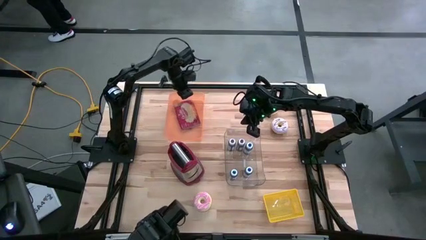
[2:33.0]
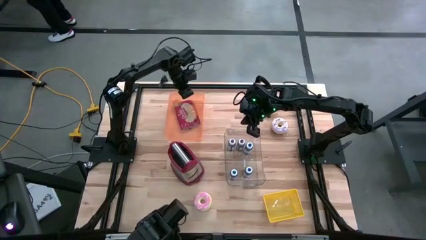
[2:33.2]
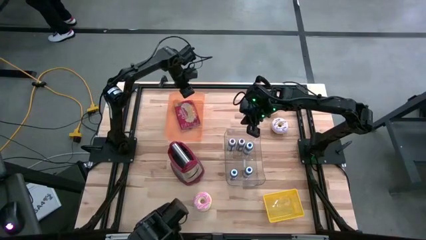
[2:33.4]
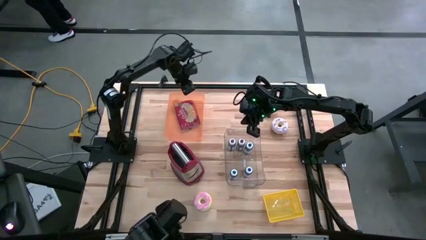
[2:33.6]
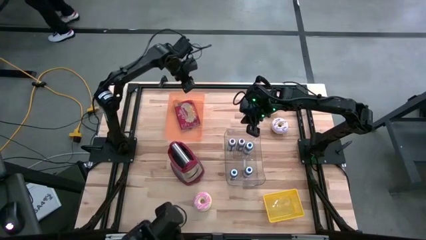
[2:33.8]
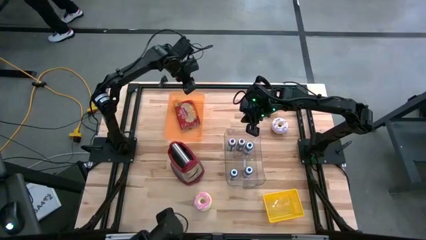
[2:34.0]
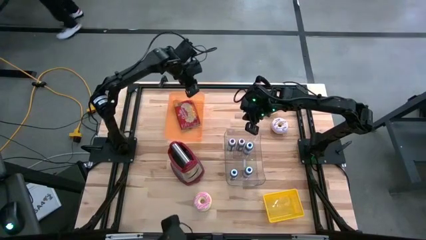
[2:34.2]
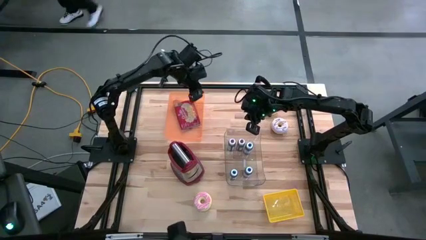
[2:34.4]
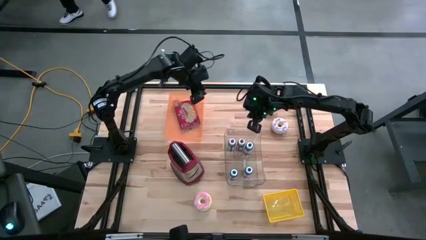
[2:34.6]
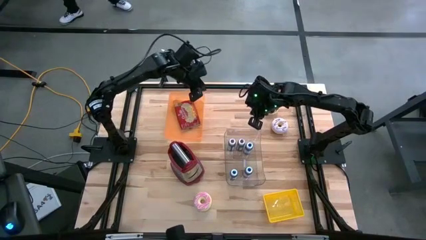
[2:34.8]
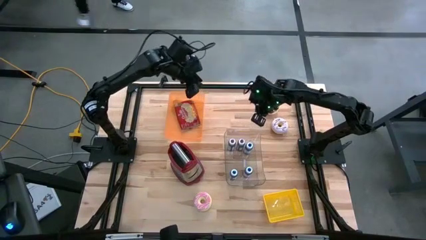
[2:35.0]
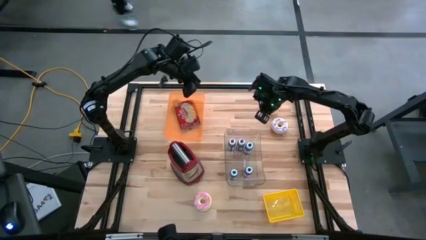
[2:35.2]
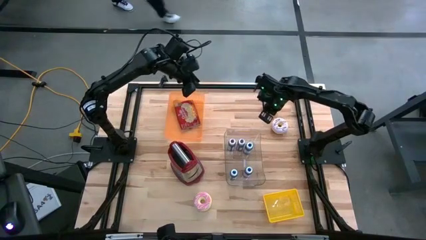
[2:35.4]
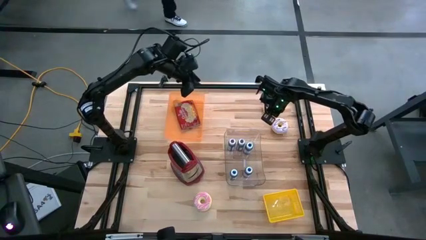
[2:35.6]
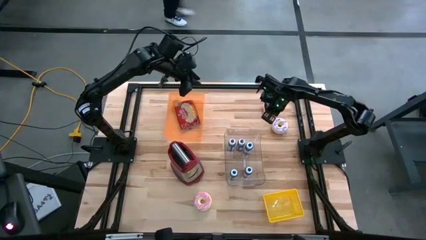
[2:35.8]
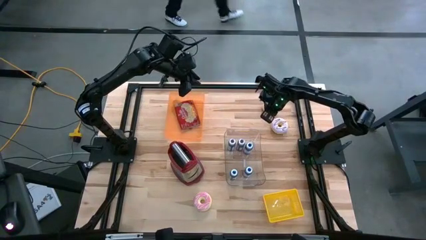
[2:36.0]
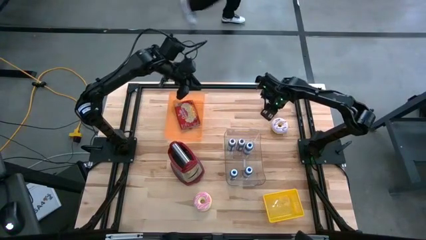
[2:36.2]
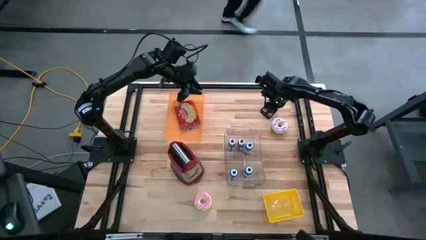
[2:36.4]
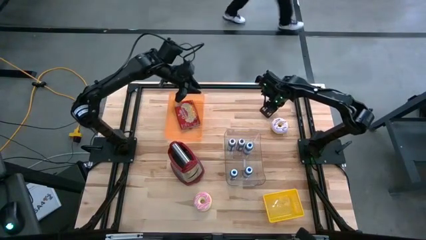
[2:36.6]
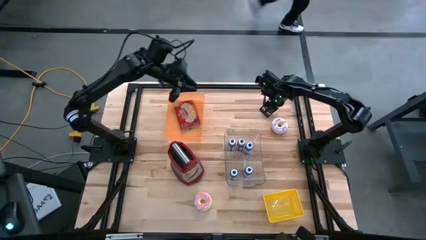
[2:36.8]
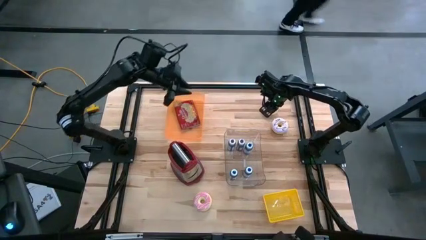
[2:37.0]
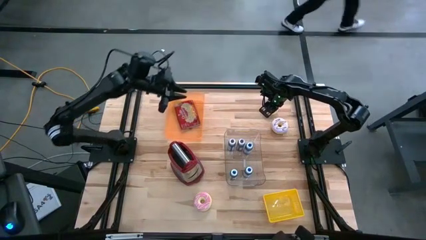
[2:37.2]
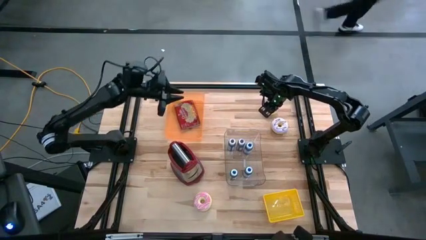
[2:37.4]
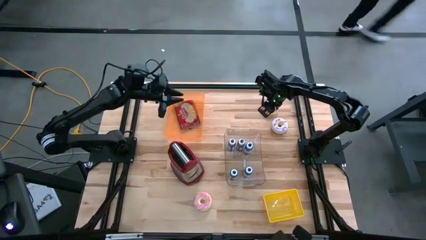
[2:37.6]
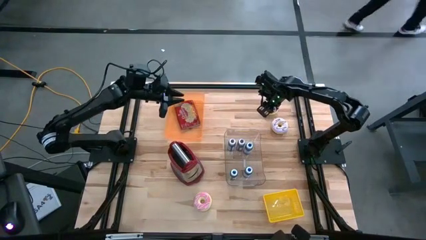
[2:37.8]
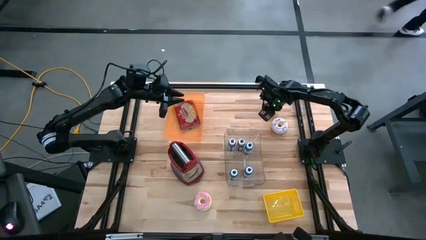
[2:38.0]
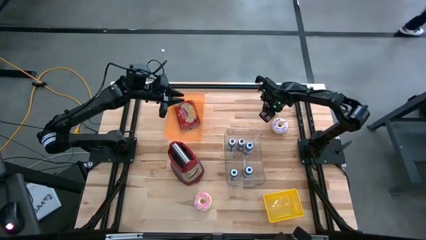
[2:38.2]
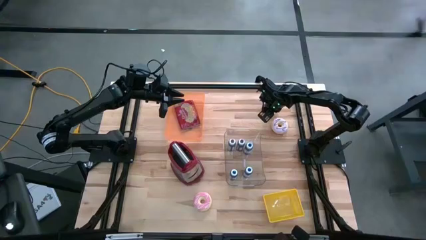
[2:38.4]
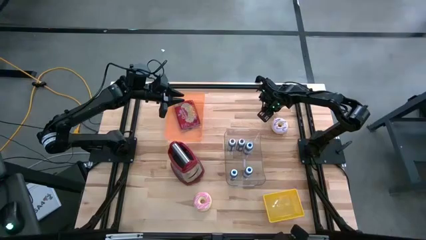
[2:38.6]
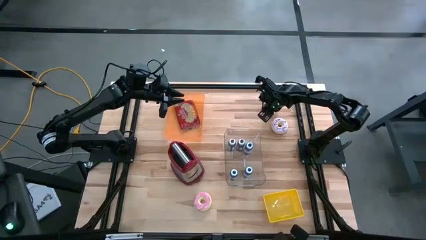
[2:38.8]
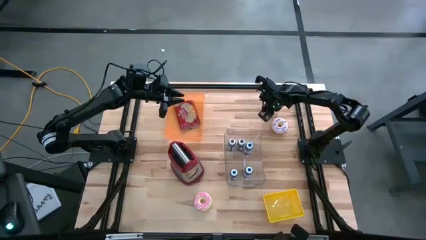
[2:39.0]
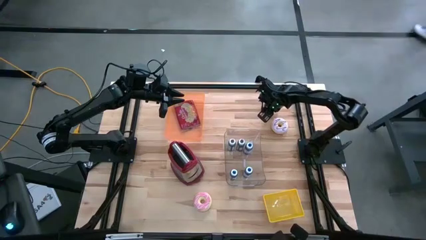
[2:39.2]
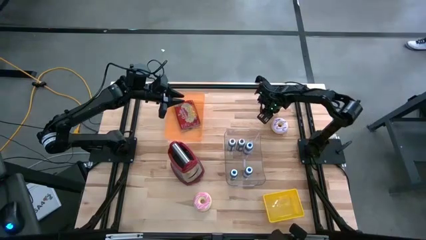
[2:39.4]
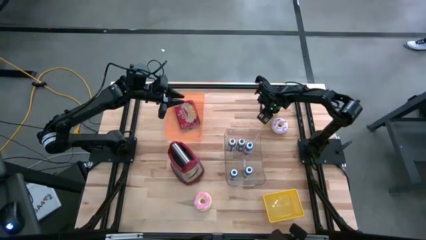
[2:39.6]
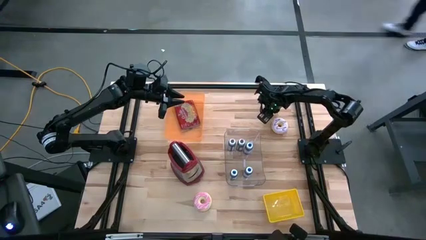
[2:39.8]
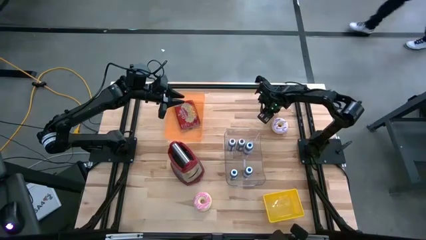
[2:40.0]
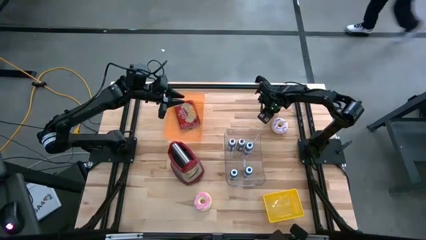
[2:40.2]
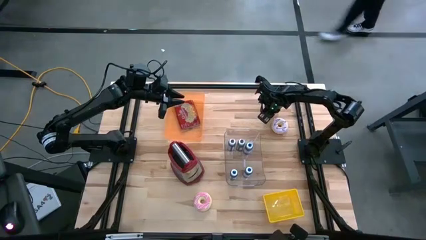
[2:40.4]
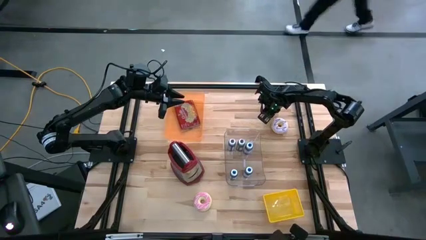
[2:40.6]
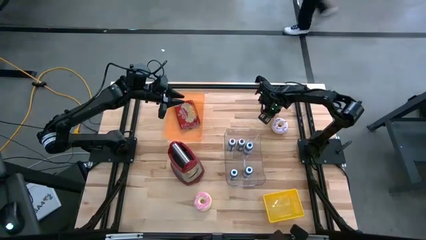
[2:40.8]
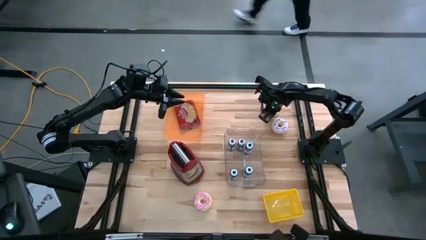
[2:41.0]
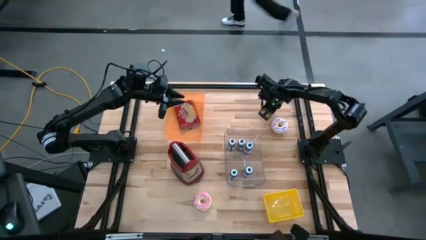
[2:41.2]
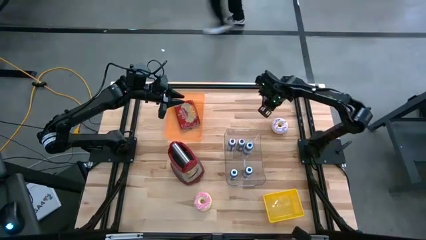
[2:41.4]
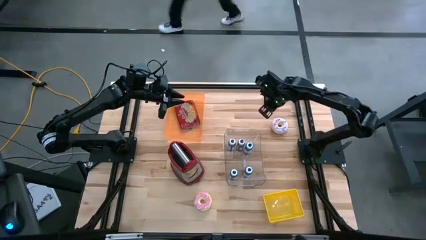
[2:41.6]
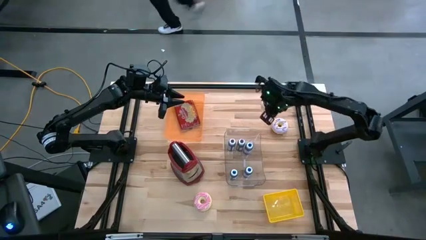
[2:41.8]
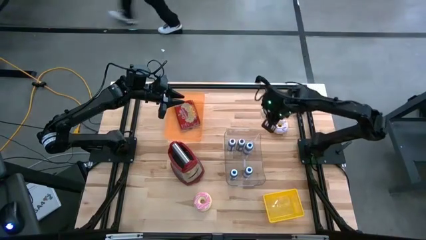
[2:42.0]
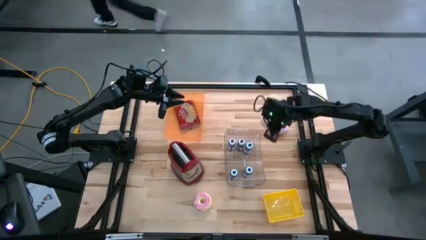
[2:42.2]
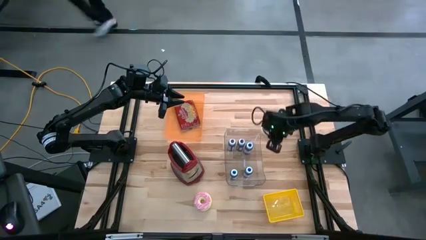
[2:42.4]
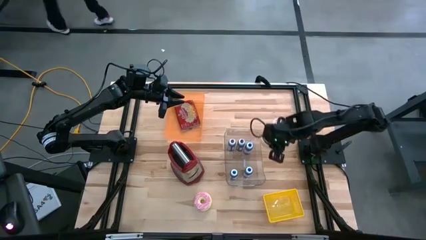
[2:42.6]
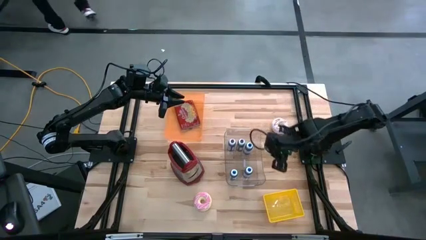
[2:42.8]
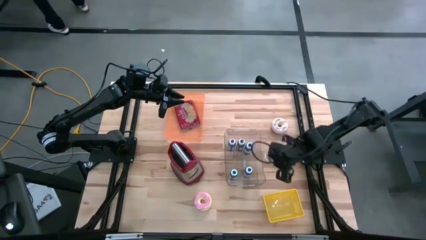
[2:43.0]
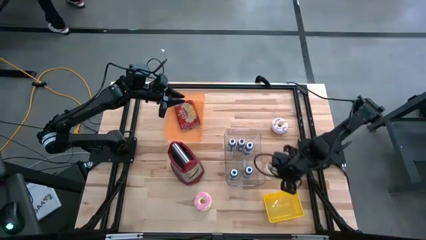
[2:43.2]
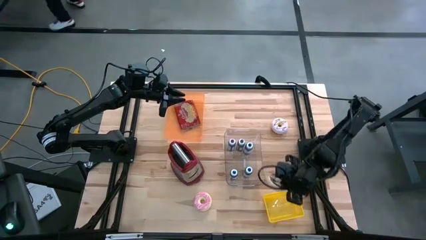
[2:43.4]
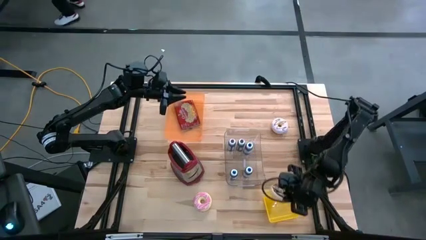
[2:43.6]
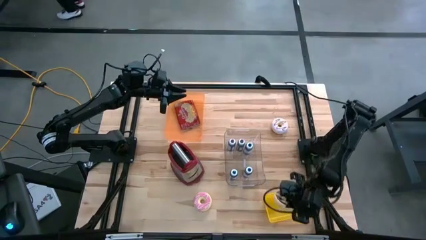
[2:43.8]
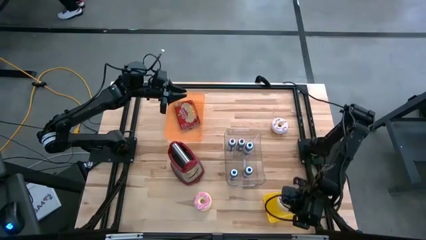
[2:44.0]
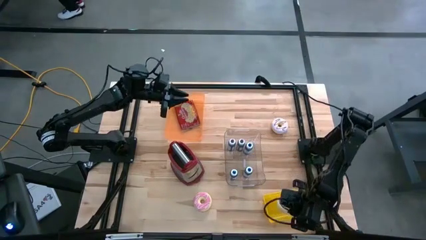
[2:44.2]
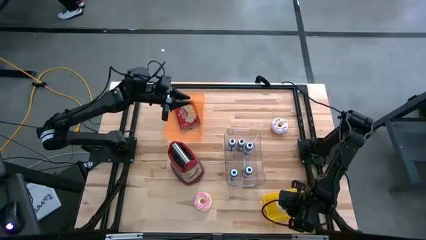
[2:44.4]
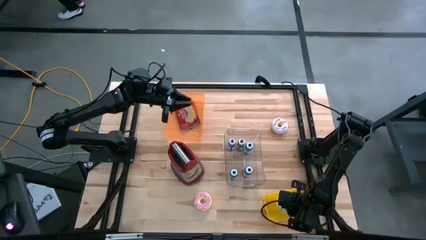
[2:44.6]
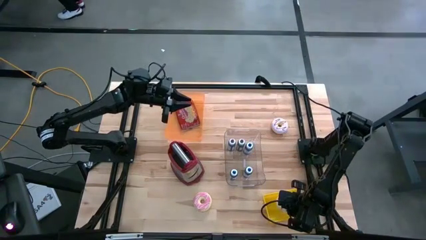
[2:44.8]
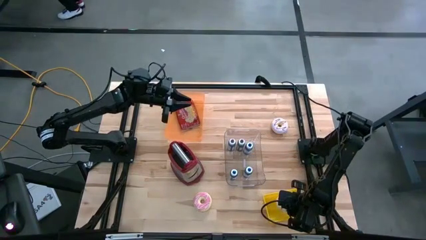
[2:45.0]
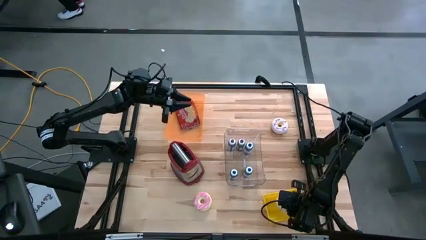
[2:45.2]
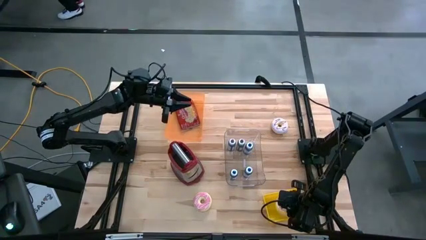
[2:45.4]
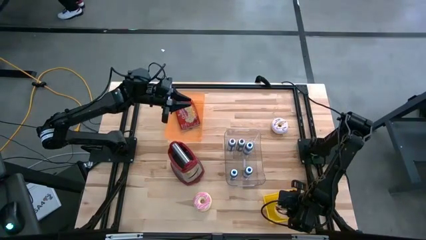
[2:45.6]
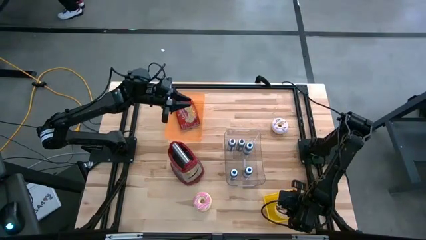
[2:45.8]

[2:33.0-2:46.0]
Task: Pick & Place Food Item
Put the black donut into the yellow bin
